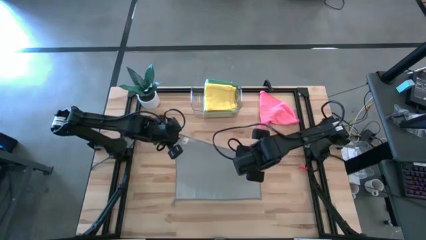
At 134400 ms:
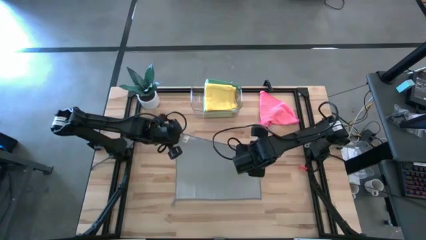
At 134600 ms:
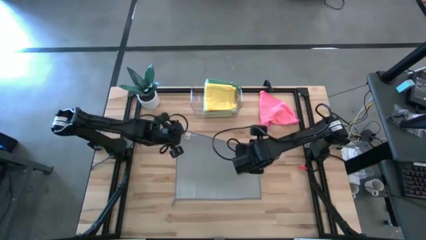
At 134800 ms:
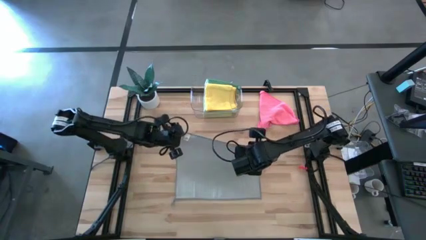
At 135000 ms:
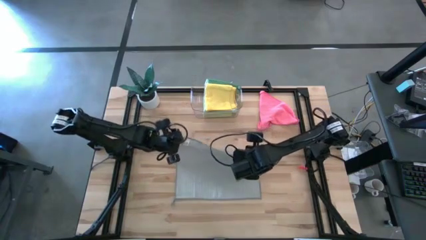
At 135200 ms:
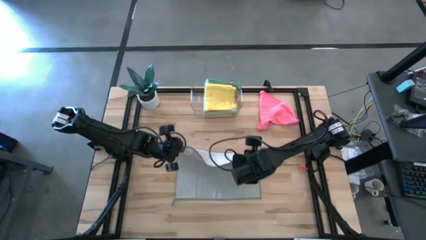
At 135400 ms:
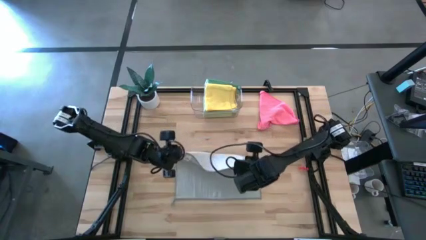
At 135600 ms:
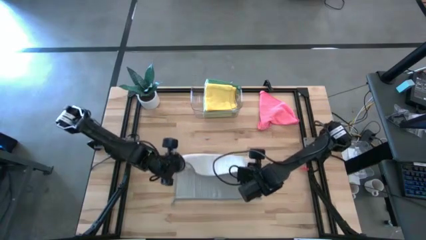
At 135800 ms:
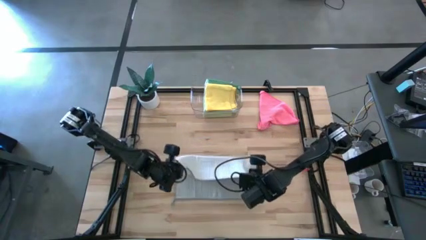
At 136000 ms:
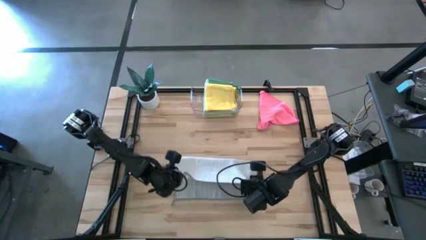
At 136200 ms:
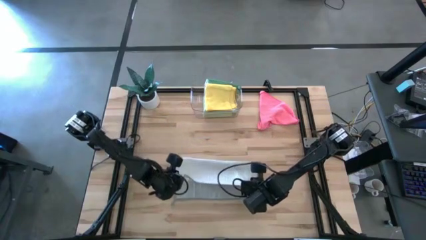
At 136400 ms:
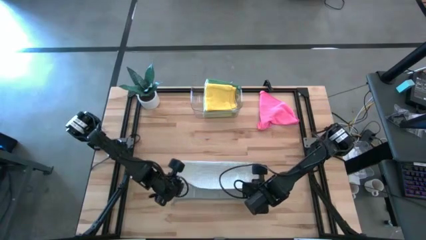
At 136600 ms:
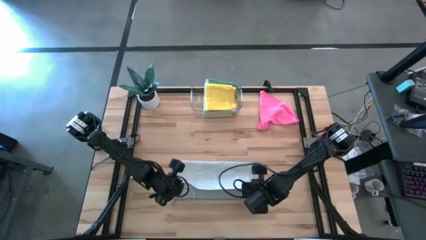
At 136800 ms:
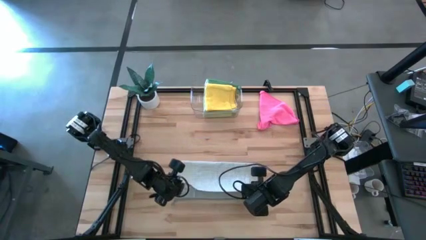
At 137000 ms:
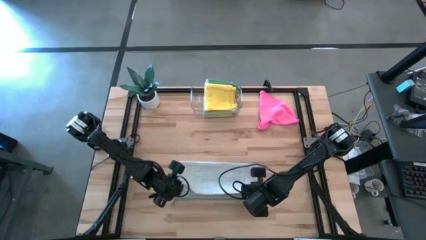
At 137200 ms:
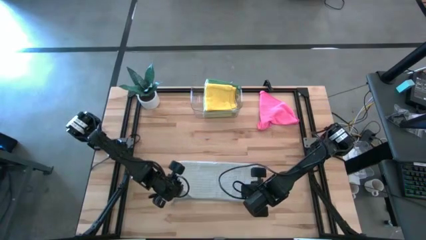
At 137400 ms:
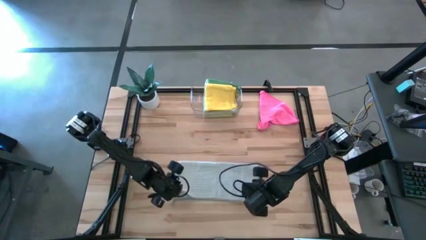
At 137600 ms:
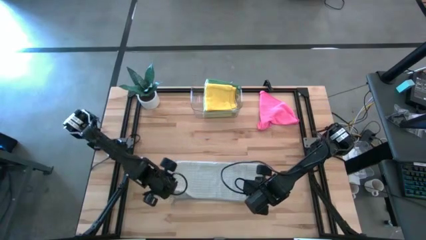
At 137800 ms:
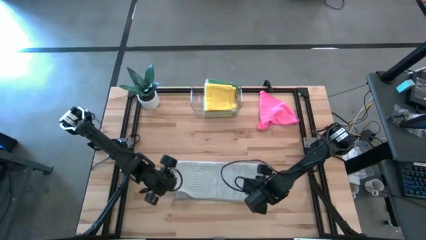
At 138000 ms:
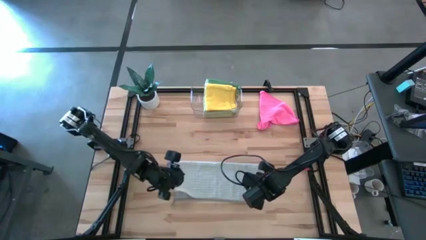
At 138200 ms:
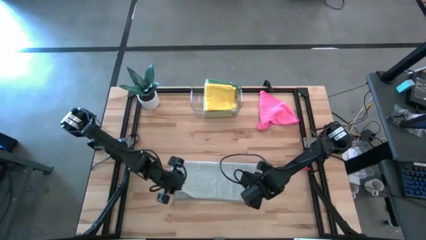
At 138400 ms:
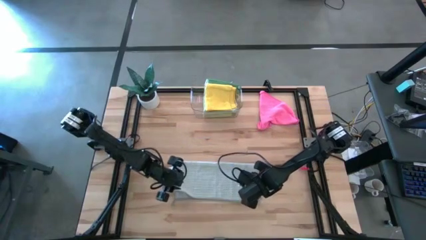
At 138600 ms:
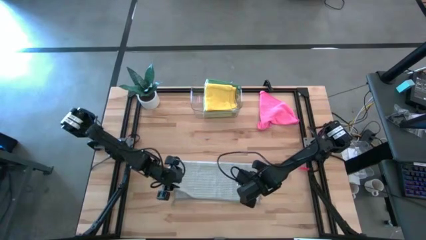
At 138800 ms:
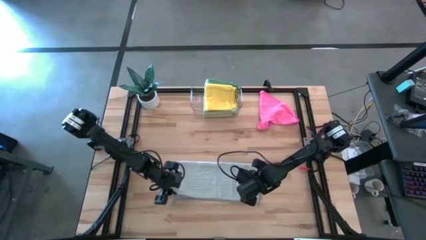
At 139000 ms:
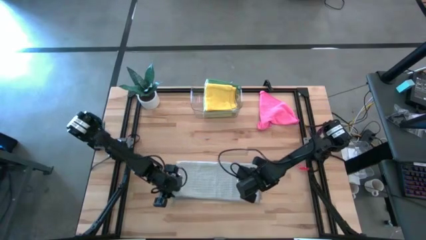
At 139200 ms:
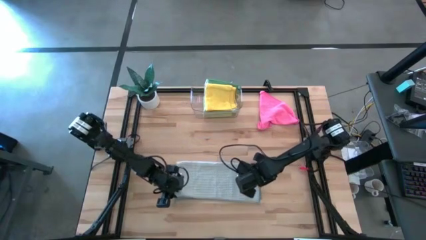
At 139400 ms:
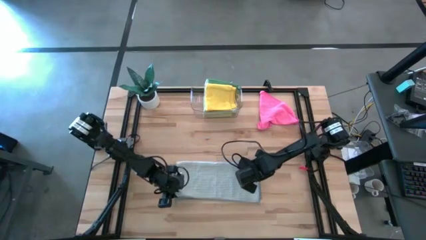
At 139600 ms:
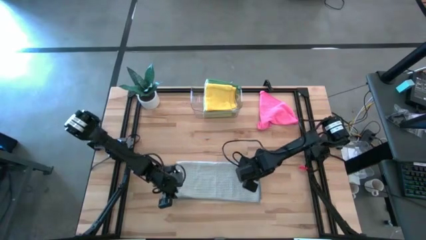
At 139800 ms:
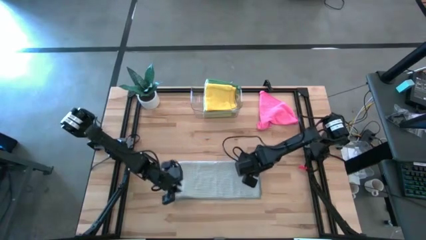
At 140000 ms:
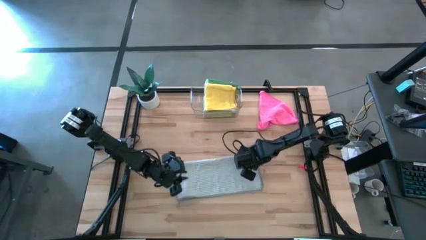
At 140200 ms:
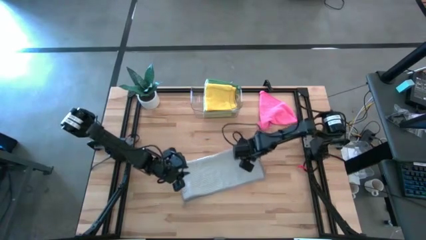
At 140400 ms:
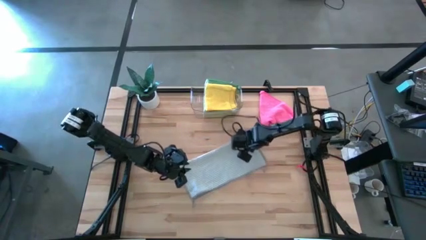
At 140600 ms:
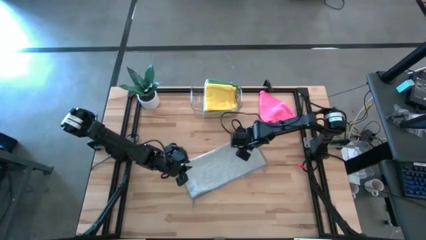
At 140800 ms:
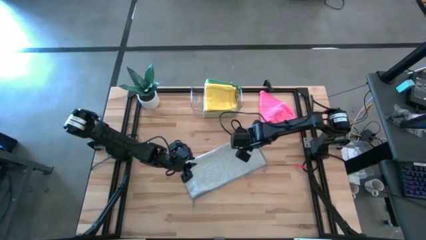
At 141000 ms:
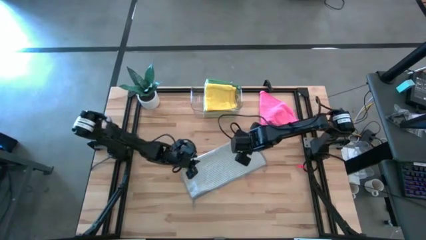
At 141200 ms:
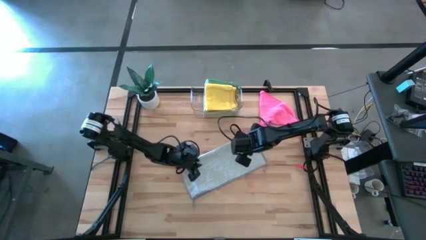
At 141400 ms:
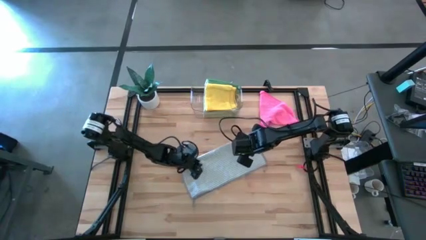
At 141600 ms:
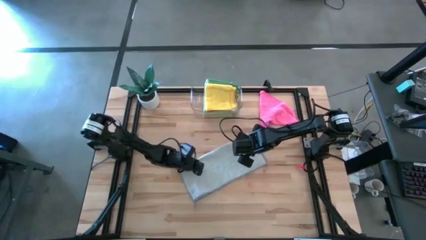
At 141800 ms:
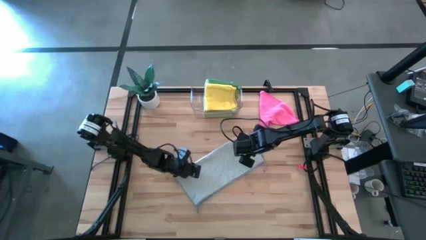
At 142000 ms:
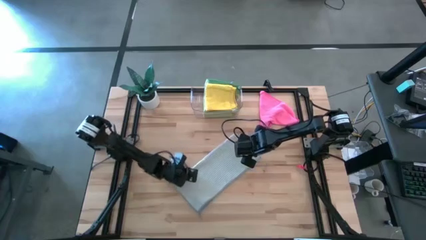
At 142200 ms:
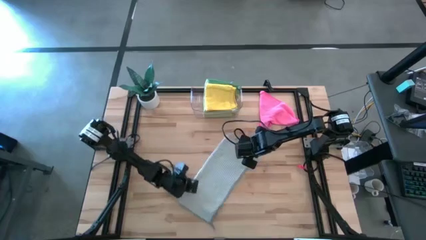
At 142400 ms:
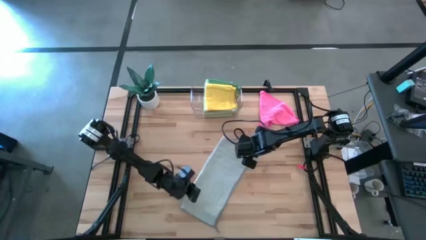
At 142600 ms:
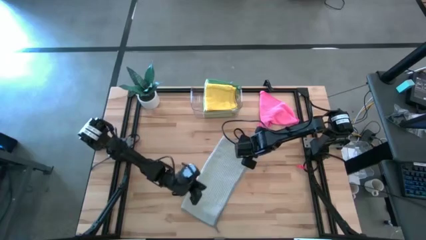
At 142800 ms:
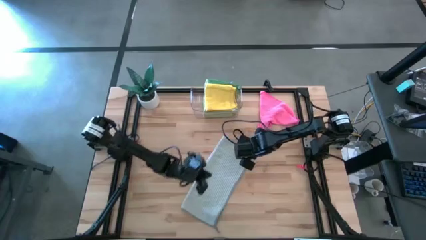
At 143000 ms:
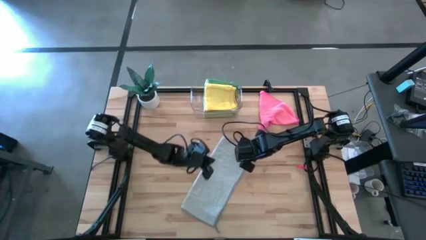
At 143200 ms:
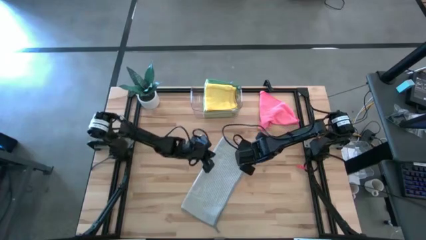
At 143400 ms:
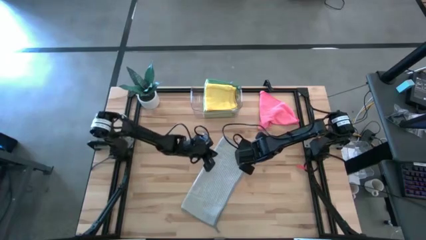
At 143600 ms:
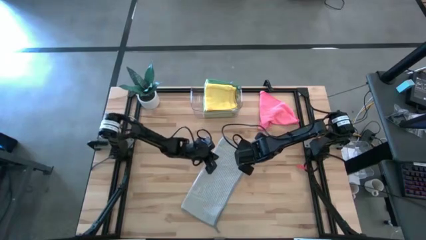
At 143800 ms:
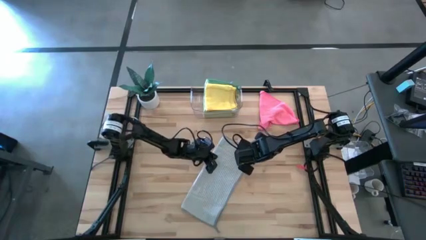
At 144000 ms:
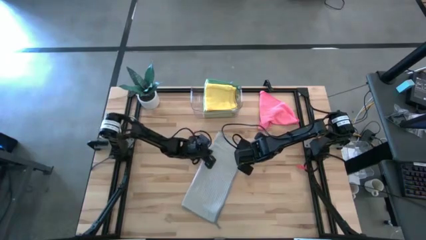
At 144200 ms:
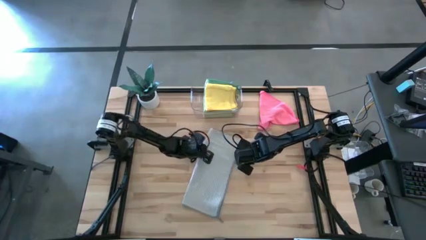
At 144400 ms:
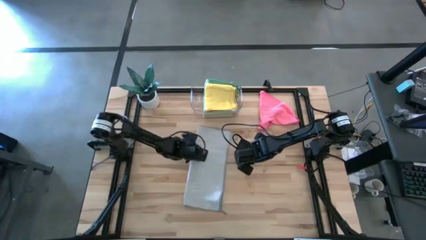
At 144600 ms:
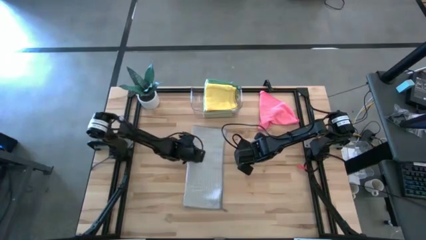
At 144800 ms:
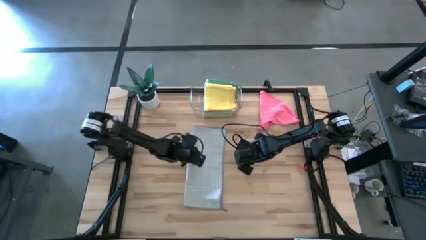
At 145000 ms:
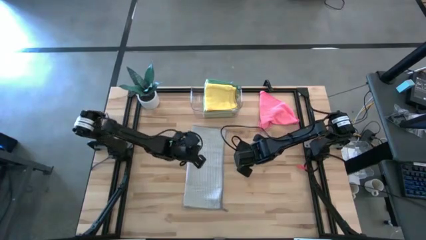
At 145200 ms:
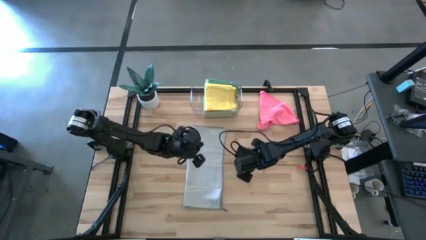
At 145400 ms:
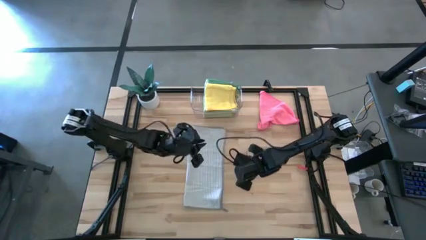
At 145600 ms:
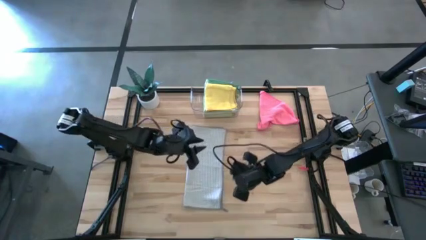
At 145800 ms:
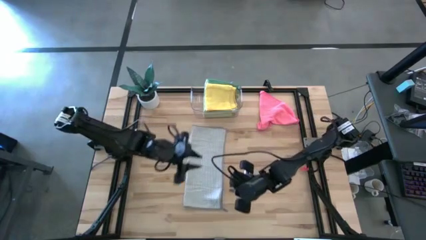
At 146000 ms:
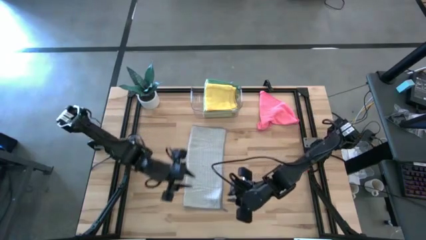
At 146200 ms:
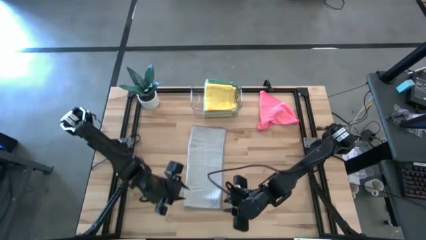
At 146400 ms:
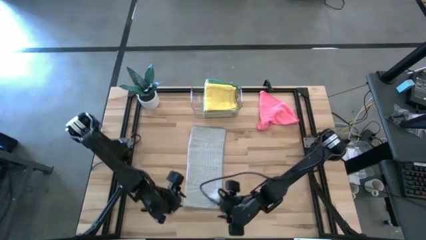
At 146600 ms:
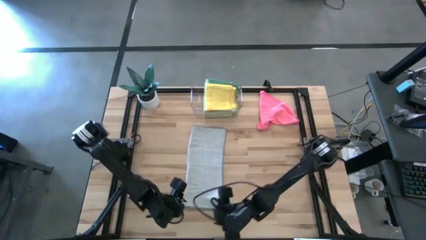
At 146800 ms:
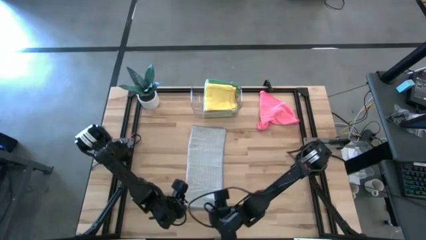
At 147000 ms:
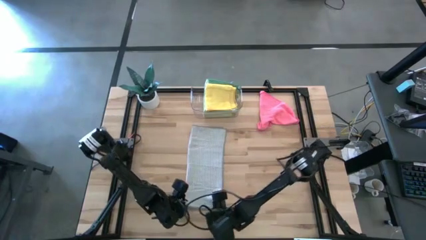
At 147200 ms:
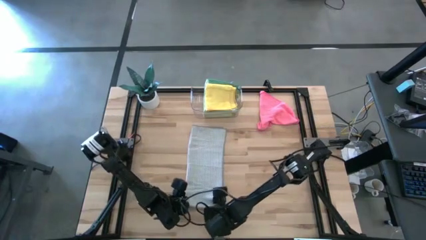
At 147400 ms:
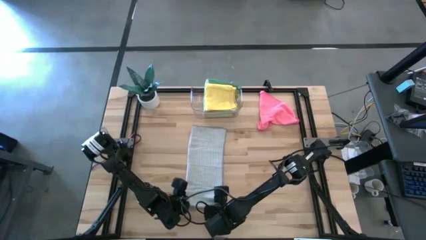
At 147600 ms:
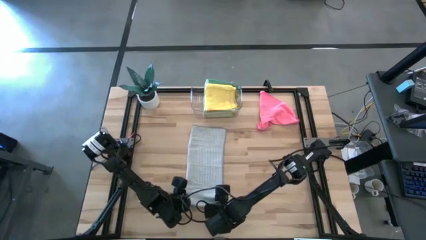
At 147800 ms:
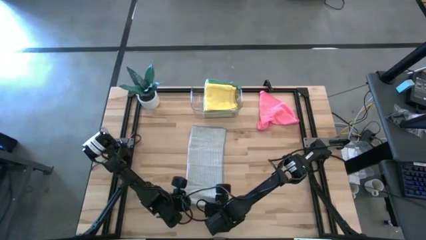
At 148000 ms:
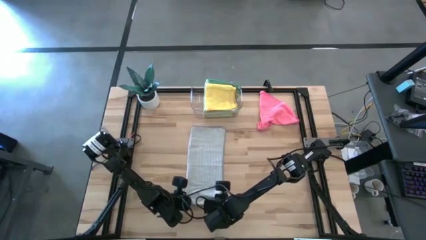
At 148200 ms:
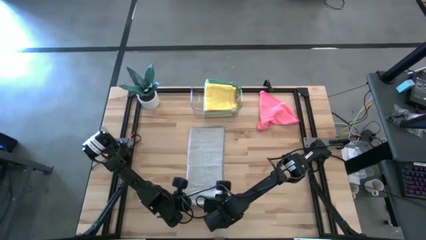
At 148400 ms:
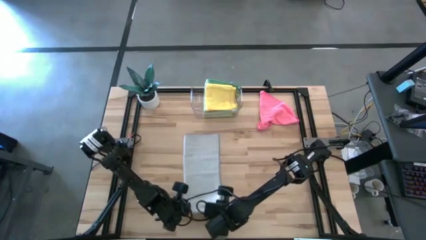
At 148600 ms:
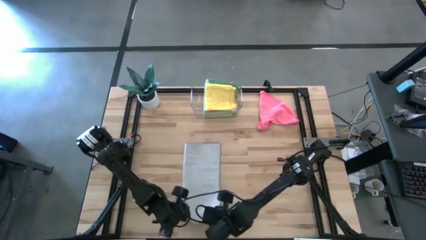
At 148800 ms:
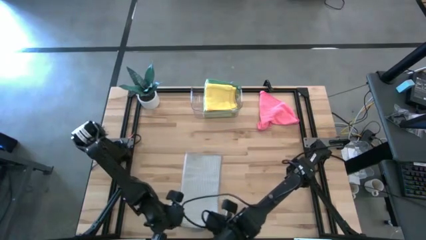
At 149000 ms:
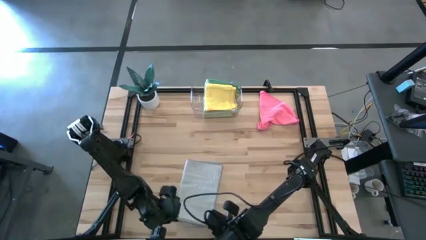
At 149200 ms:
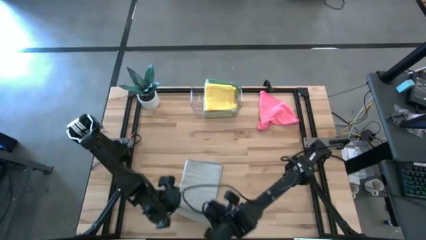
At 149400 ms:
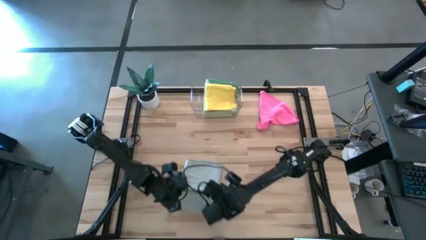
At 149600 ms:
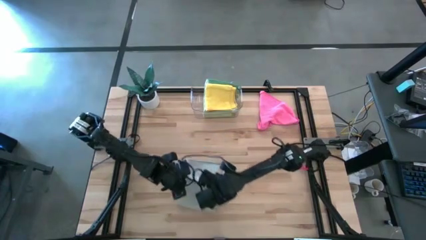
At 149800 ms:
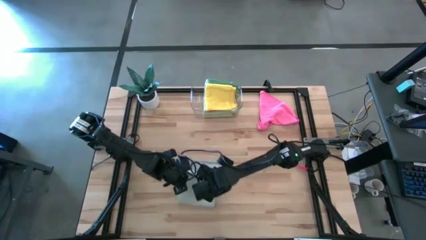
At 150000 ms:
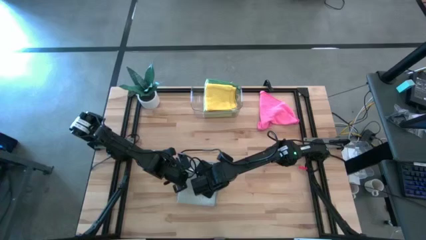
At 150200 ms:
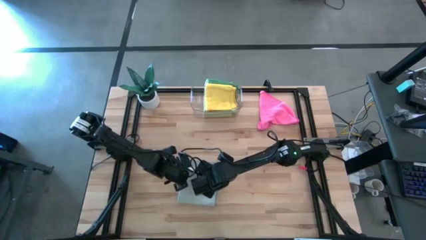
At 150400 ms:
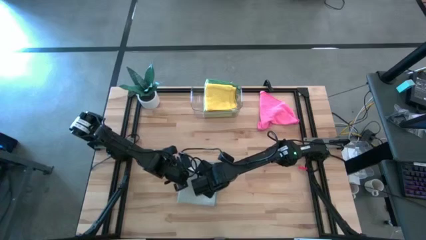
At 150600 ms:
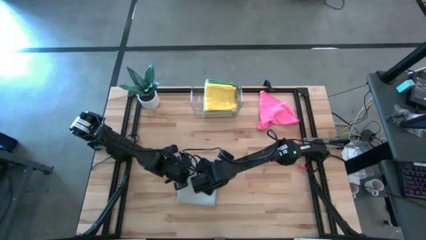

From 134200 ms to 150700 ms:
Task: Fold microfiber towels
Fold the gray microfiber cloth
